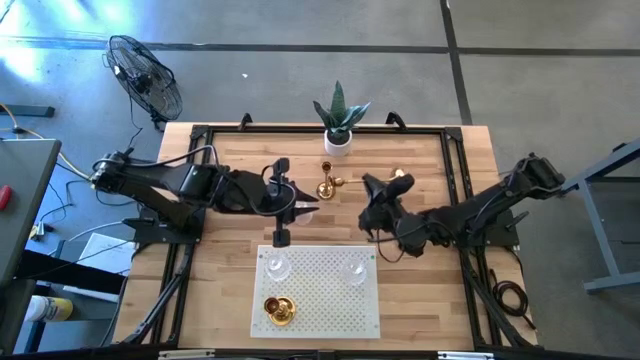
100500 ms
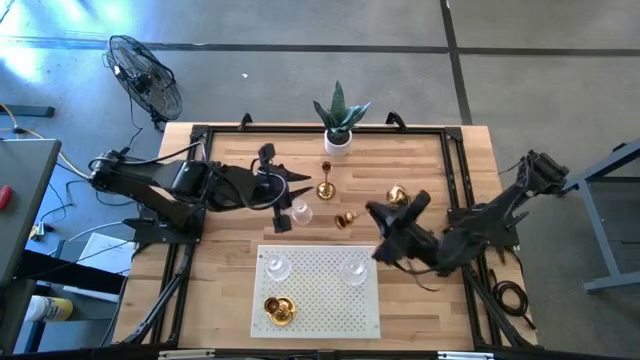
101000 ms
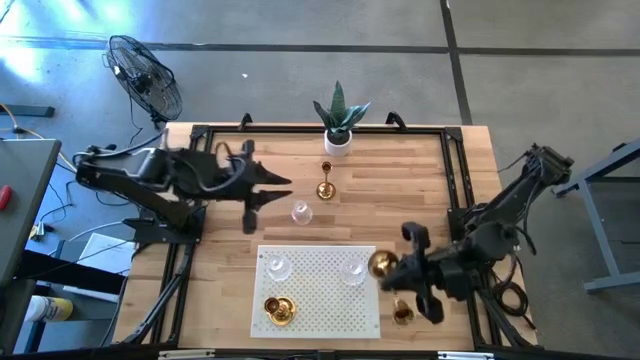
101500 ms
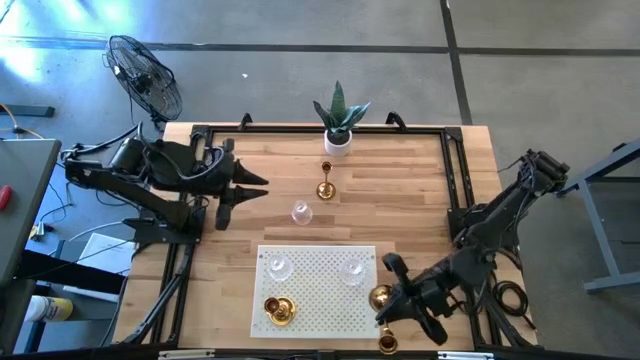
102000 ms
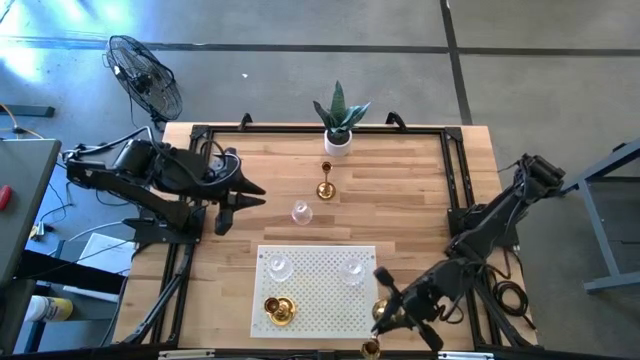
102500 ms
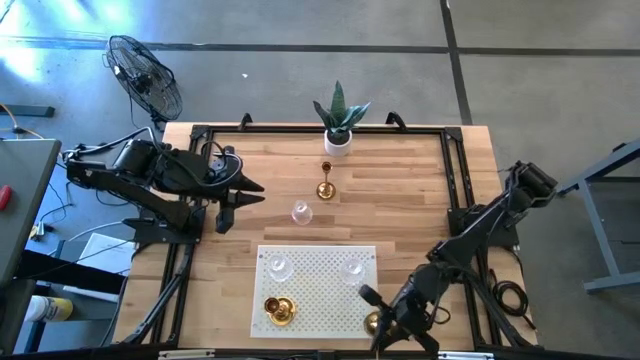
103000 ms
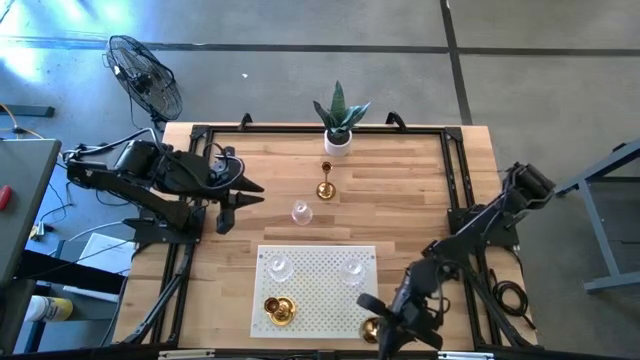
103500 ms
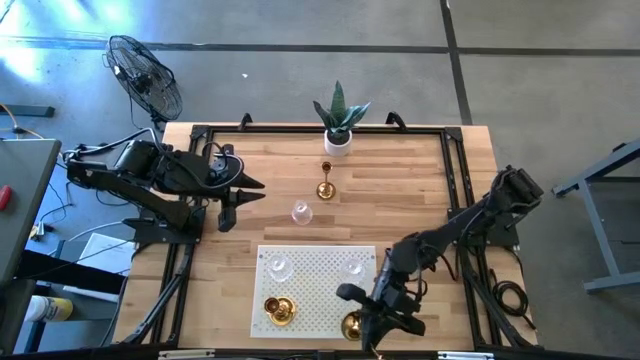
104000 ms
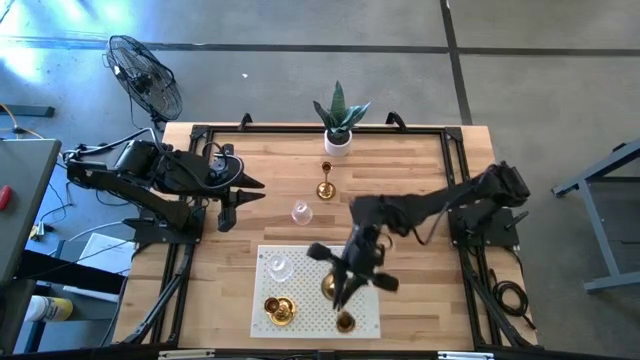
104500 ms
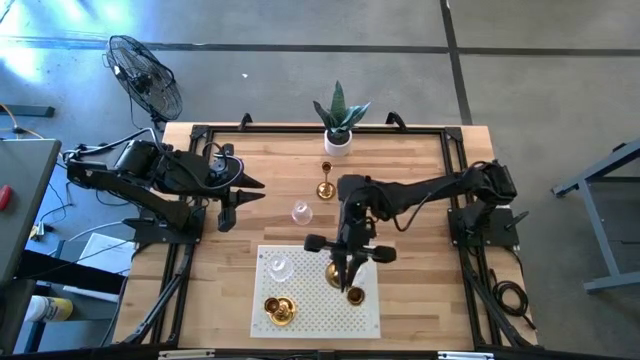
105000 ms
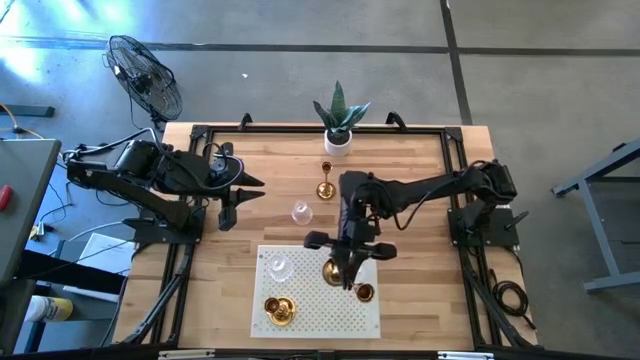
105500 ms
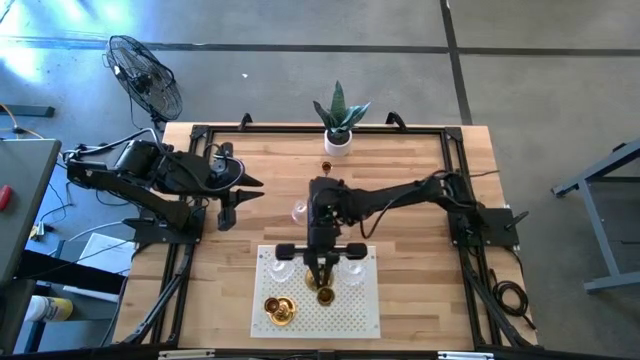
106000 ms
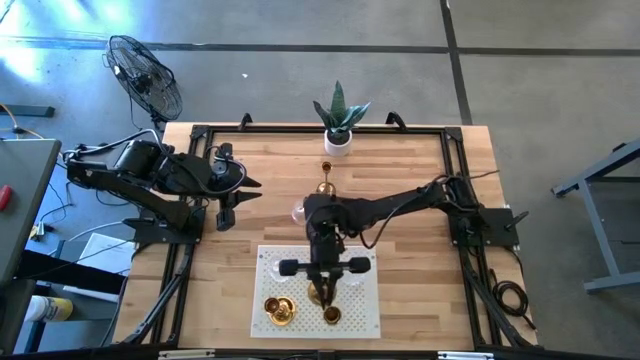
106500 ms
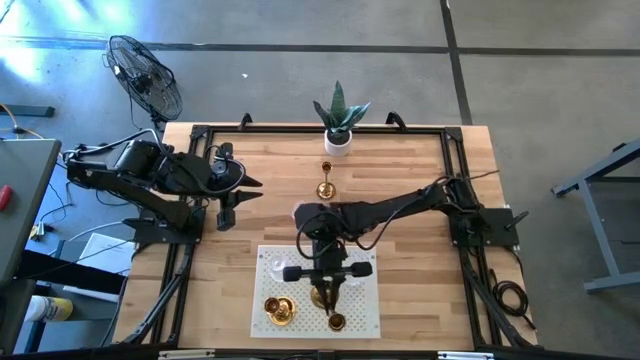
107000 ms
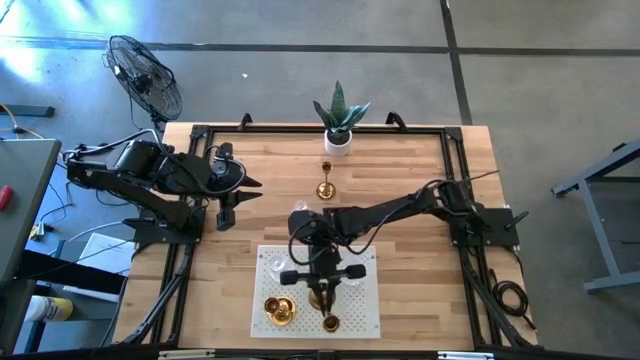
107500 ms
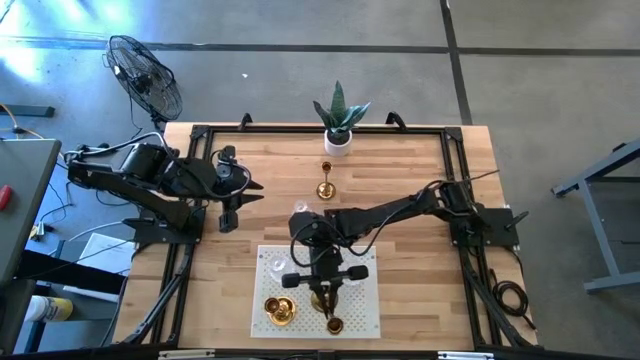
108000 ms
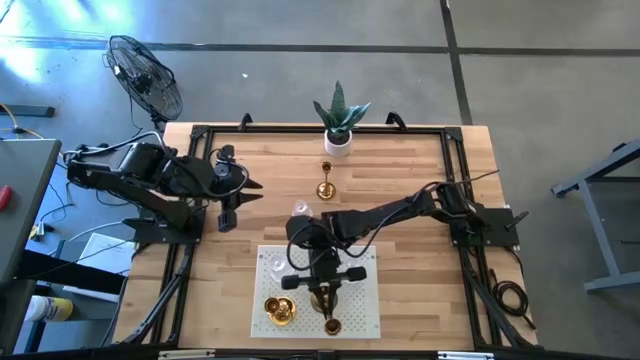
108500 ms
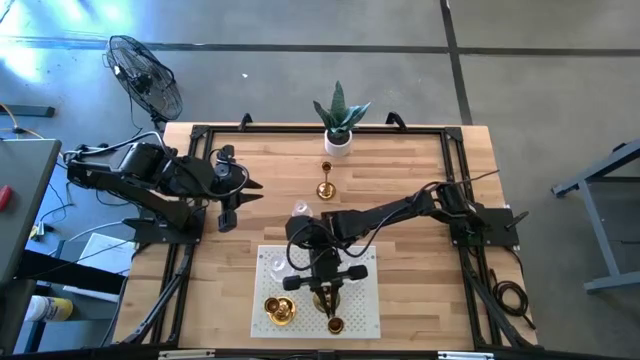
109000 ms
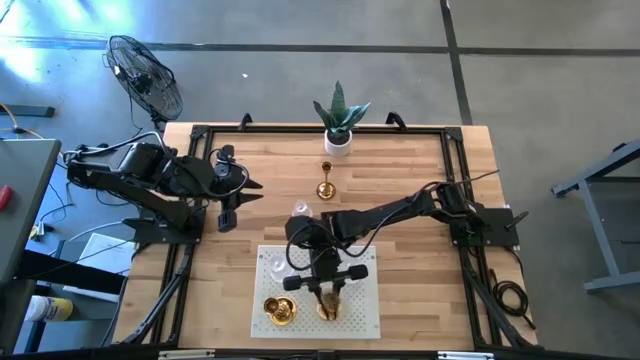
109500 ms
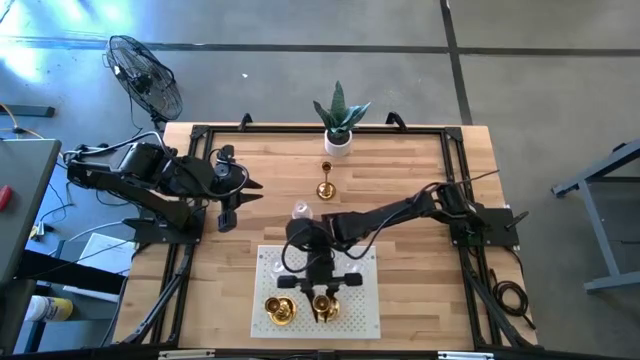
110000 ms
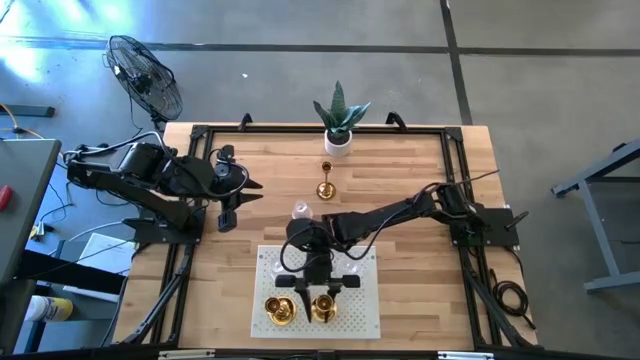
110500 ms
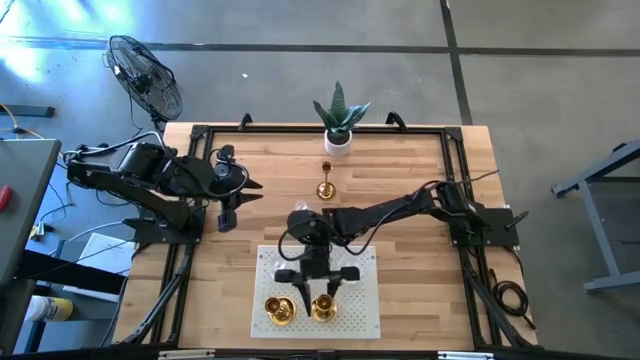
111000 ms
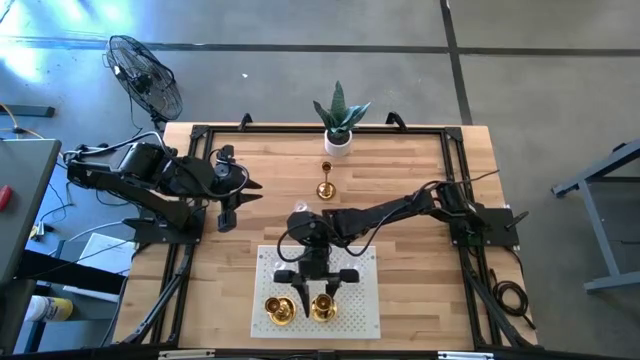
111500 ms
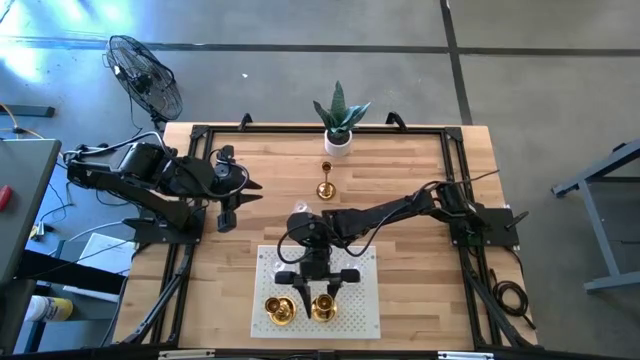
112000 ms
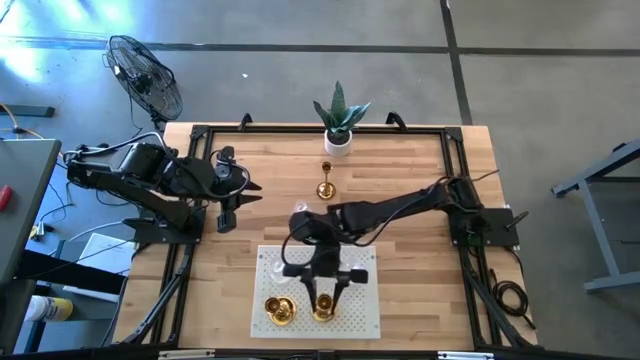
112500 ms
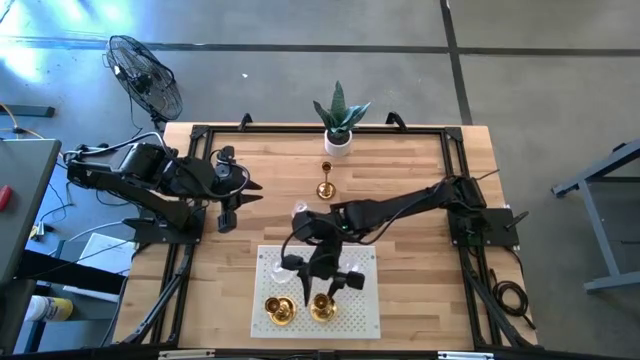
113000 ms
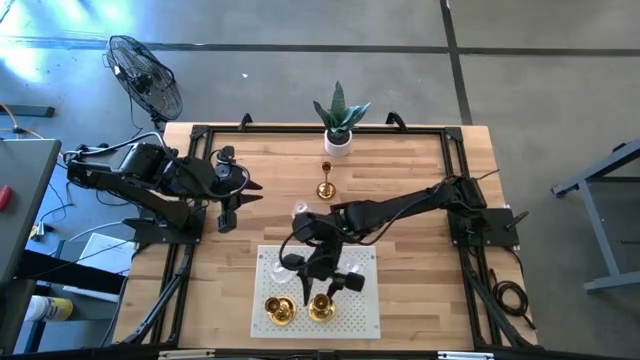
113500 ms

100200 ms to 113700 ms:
Task: Pick & Place candle stick holders
Put the bottom gold candle holder on the shelf

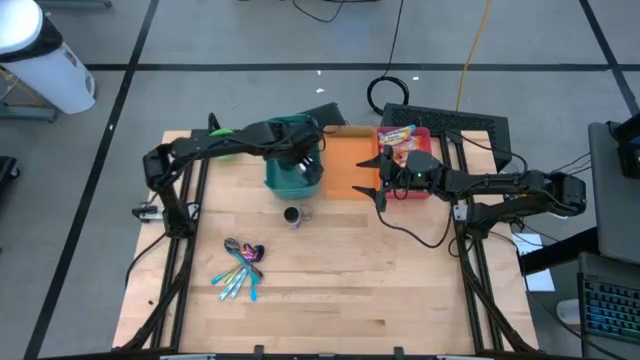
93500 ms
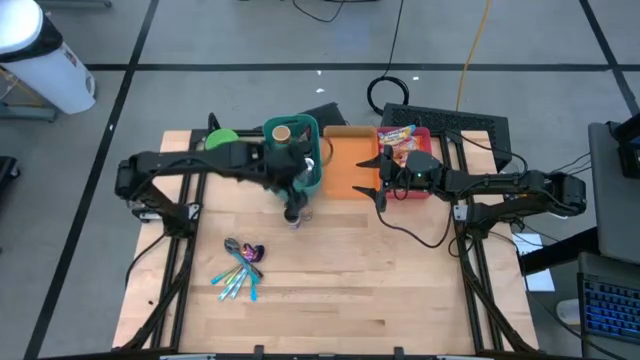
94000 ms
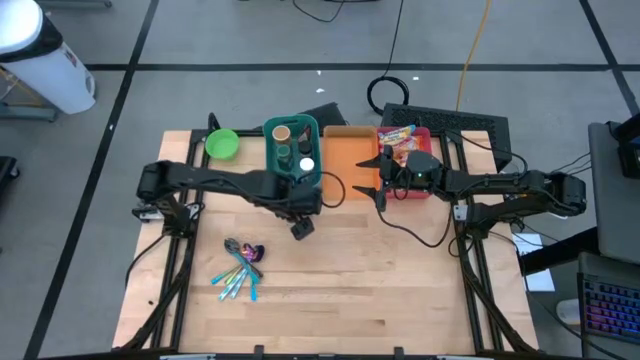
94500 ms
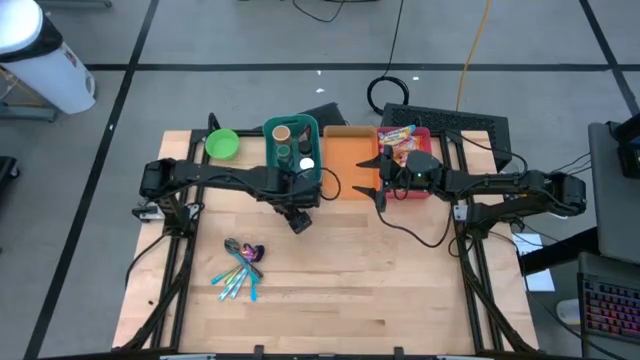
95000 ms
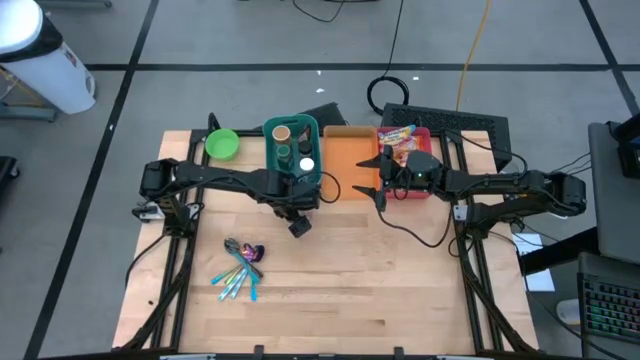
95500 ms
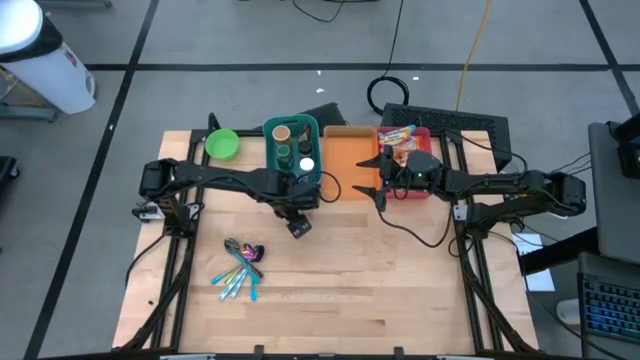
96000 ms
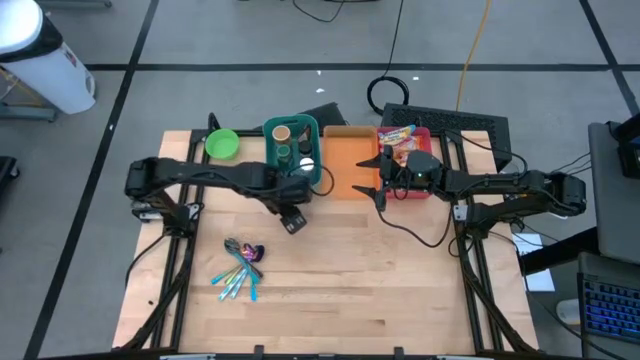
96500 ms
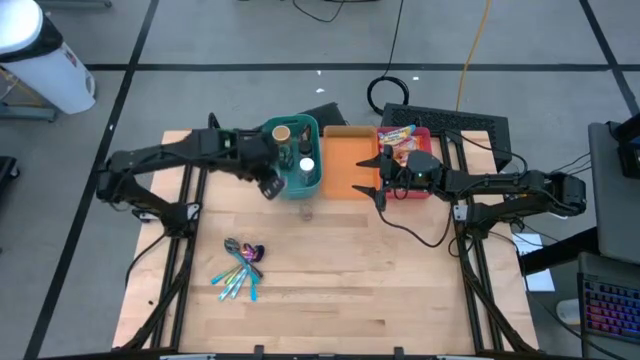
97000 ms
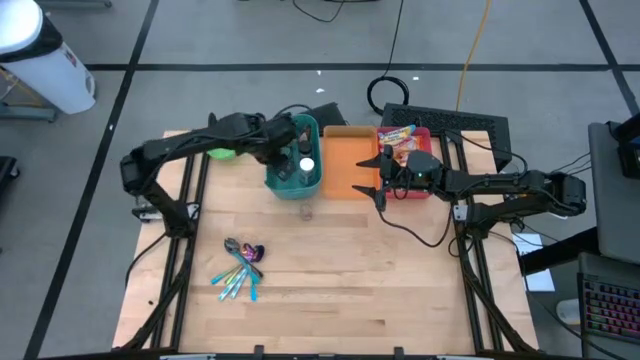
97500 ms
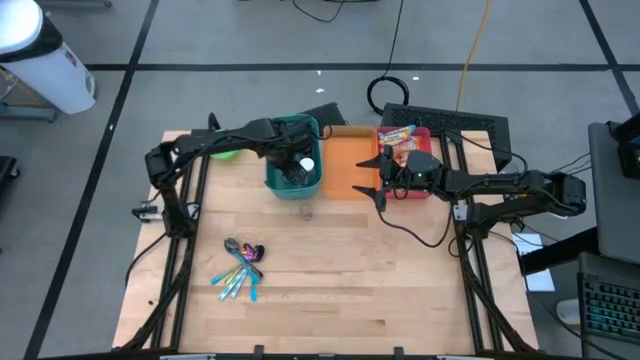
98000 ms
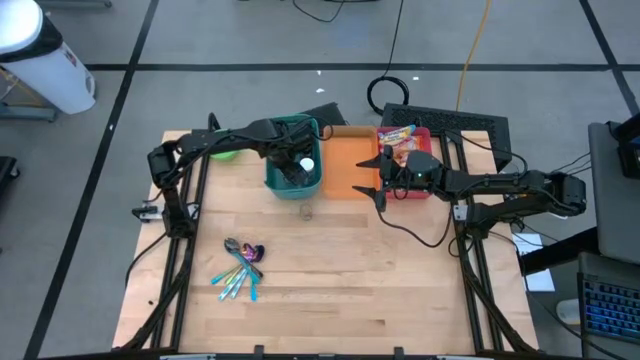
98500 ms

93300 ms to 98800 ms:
Task: Pick & Place Food Item
Put the black and purple seasoning bottle into the green bin

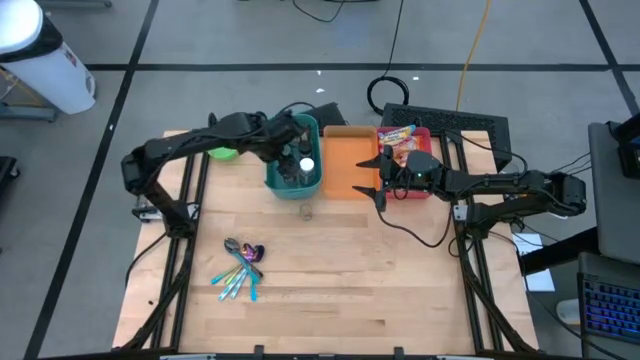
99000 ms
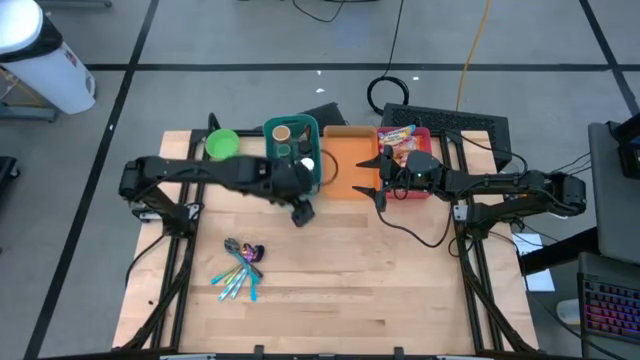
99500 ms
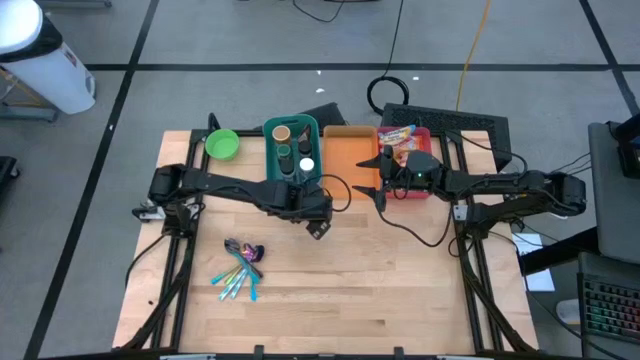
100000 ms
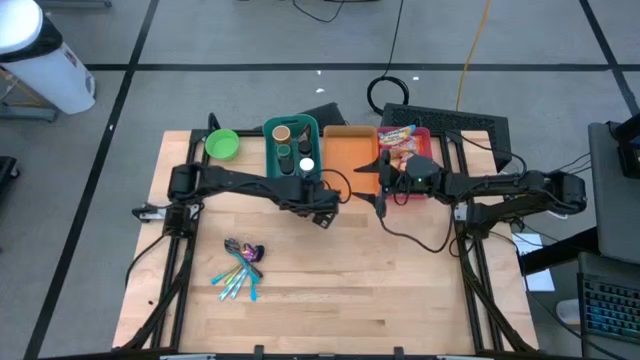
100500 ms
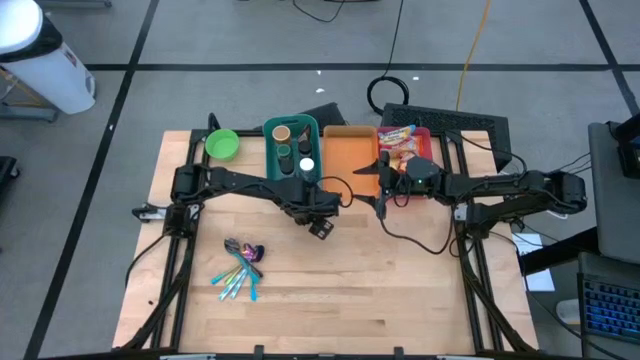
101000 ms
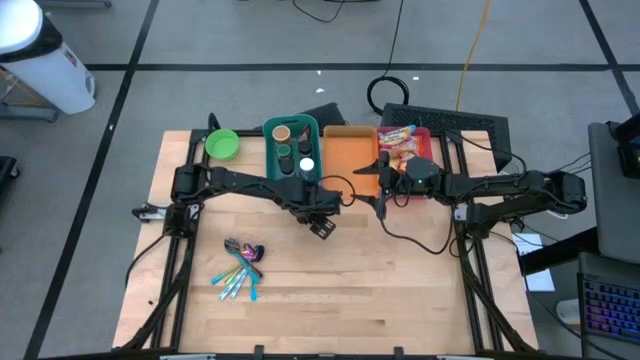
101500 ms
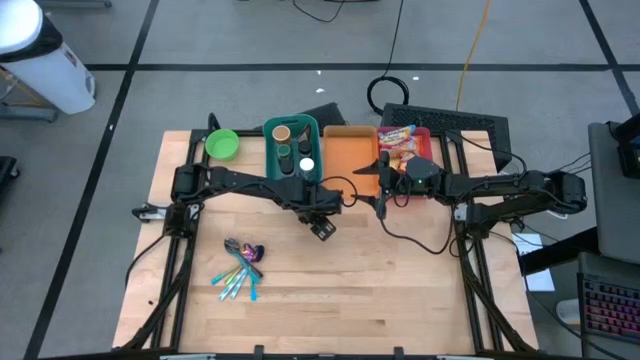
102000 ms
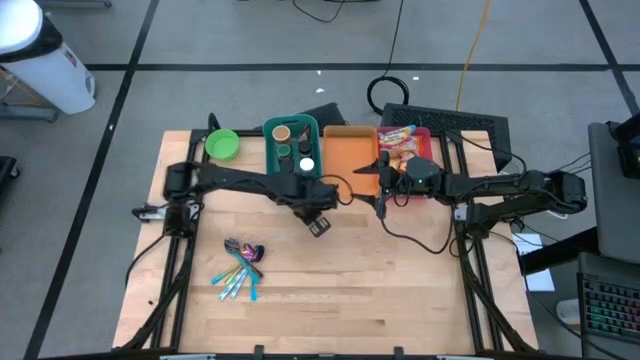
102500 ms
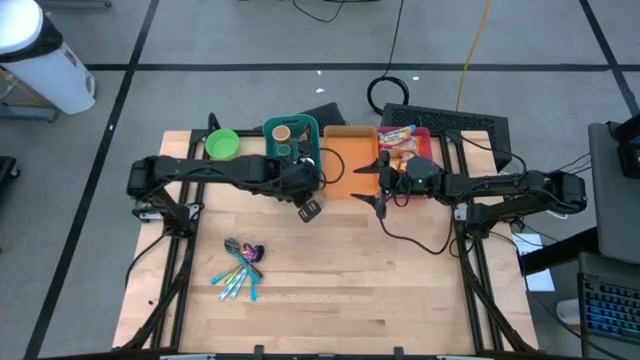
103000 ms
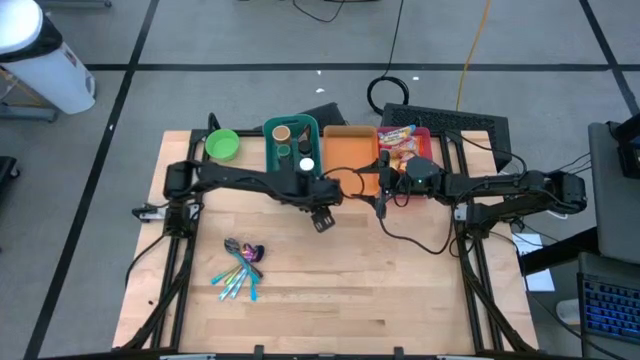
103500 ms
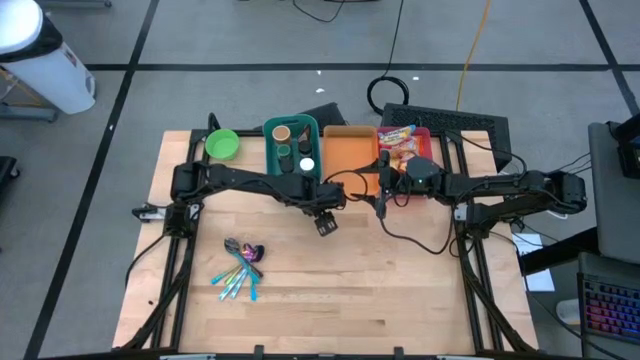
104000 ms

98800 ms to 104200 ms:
Put the brown seasoning bottle into the green bin
